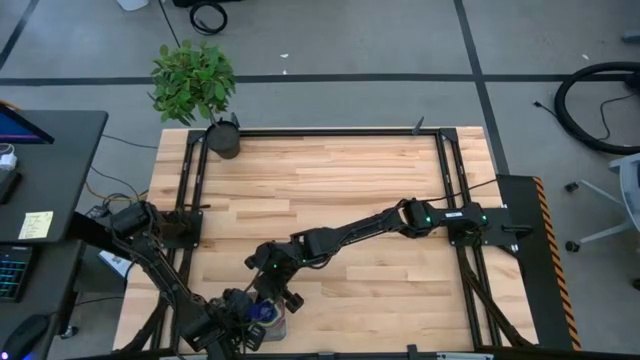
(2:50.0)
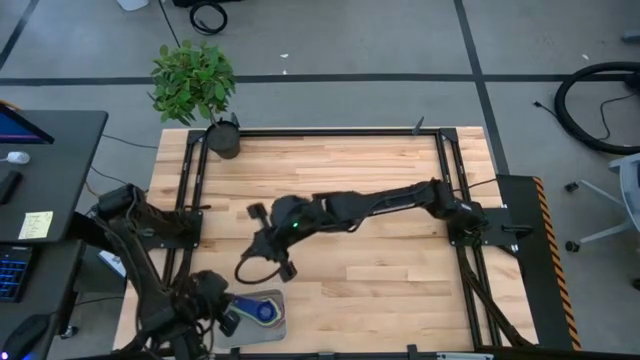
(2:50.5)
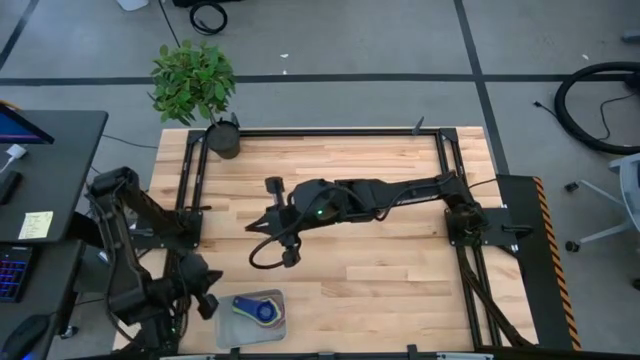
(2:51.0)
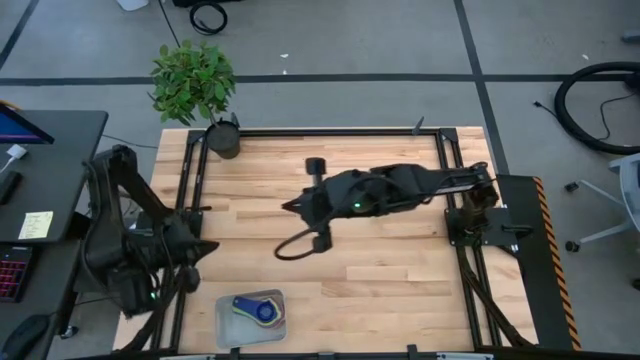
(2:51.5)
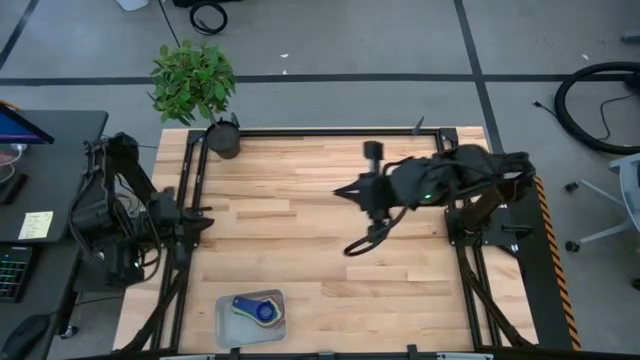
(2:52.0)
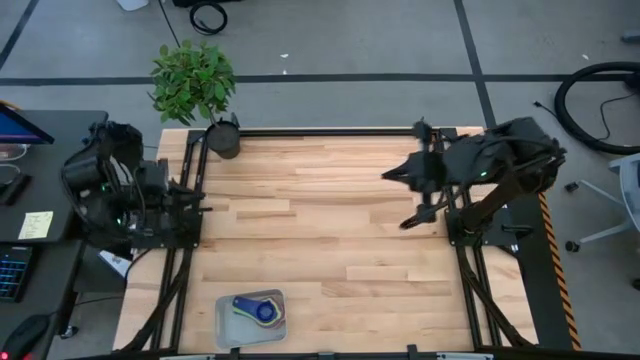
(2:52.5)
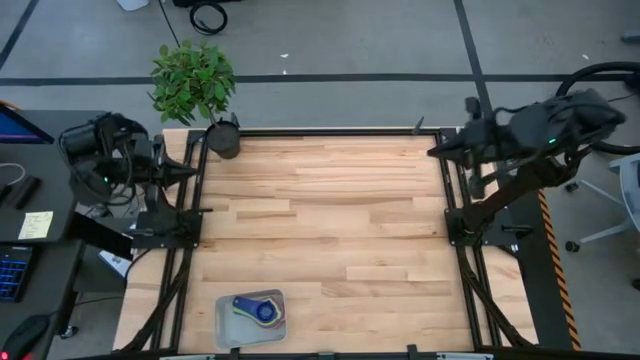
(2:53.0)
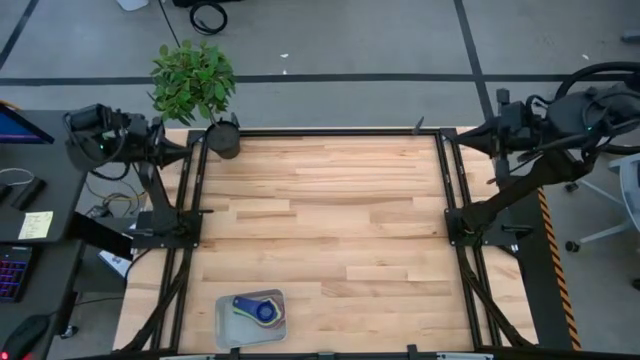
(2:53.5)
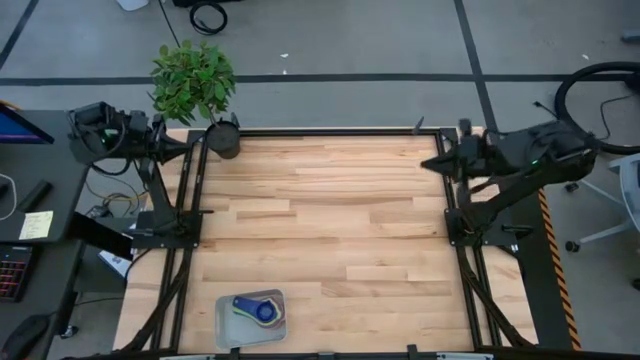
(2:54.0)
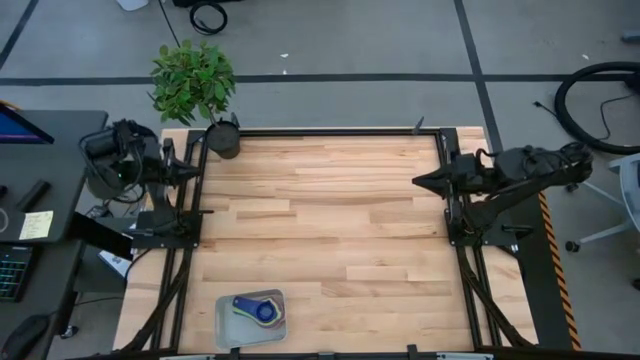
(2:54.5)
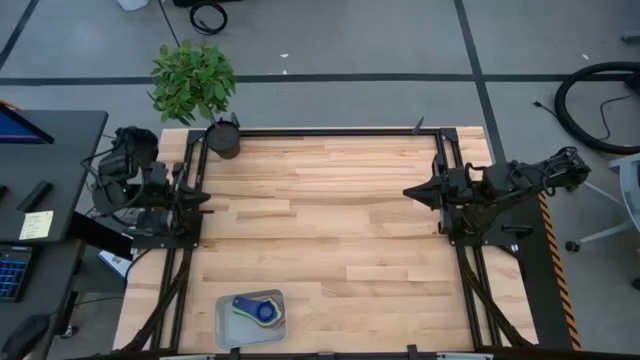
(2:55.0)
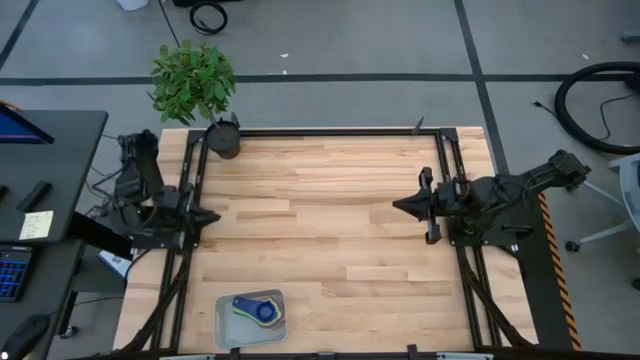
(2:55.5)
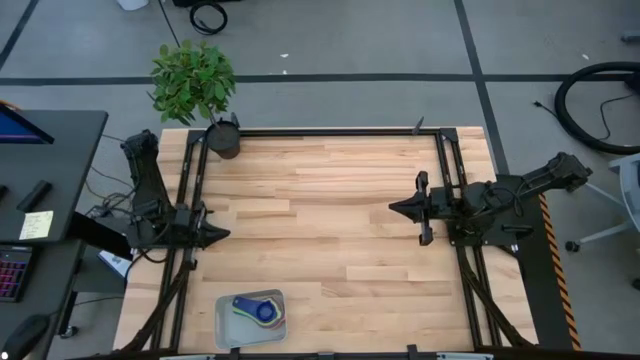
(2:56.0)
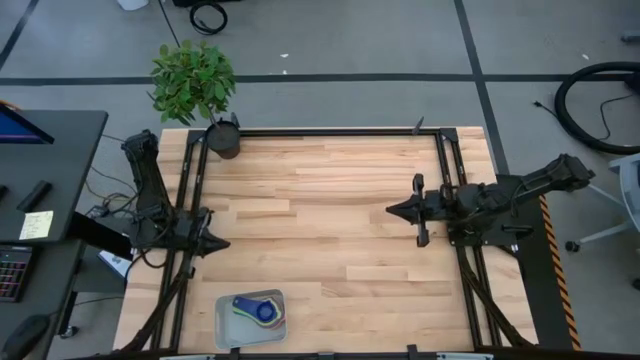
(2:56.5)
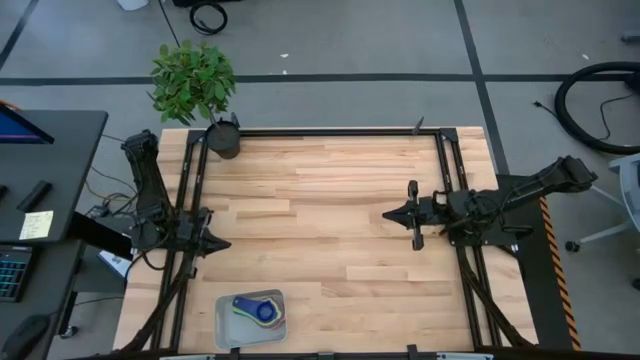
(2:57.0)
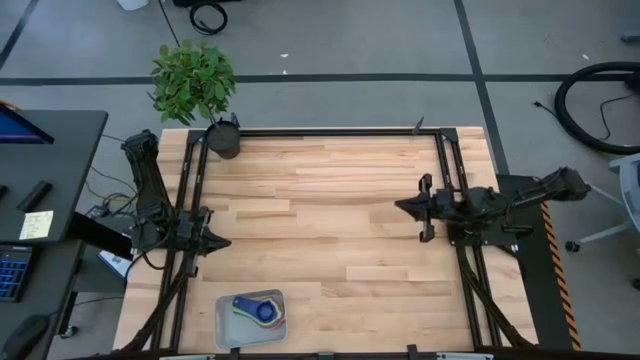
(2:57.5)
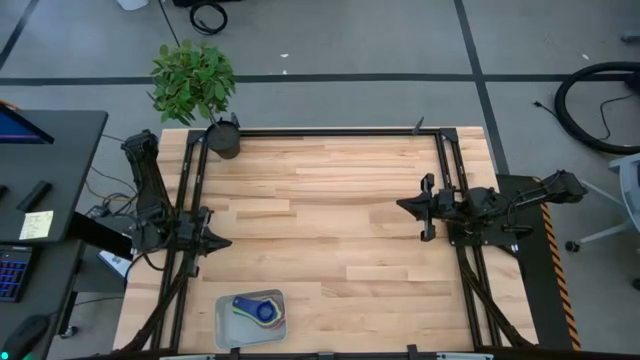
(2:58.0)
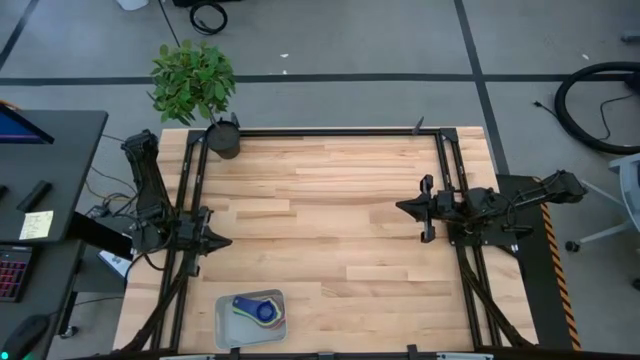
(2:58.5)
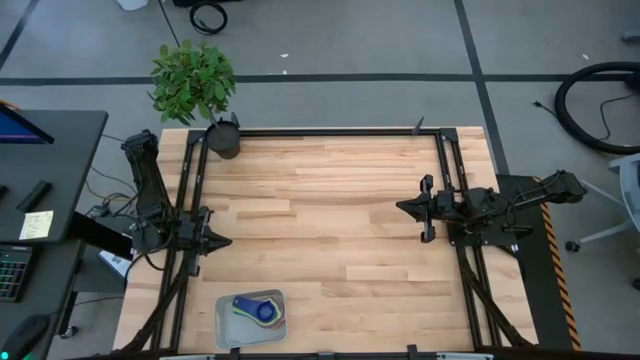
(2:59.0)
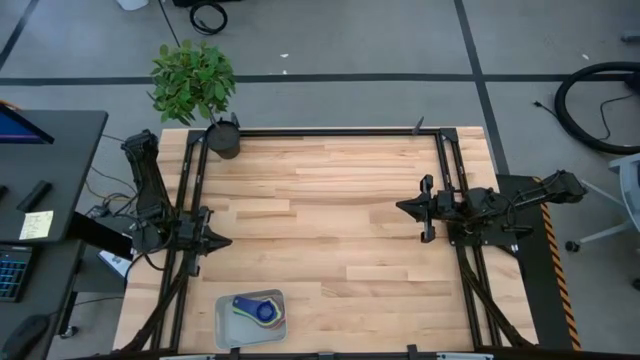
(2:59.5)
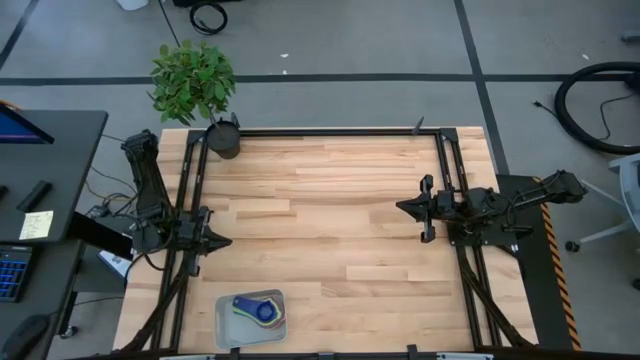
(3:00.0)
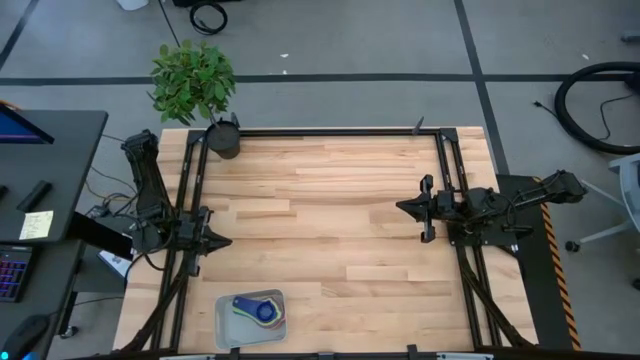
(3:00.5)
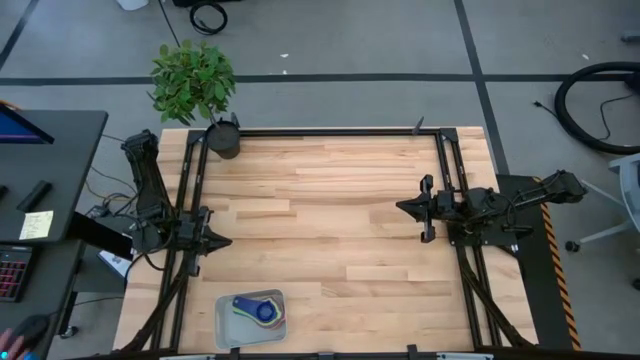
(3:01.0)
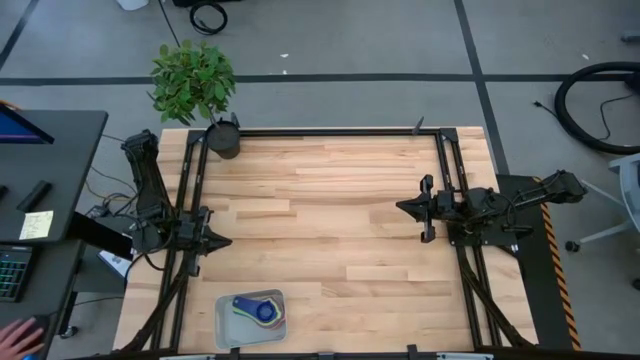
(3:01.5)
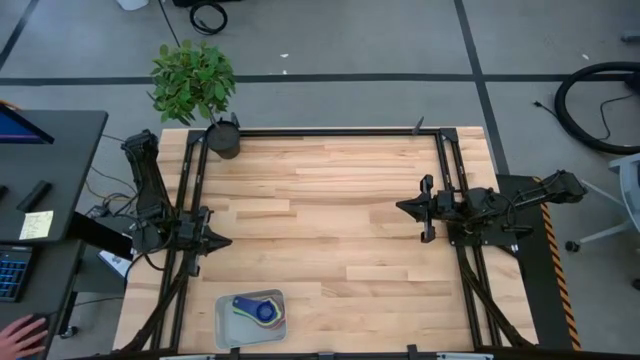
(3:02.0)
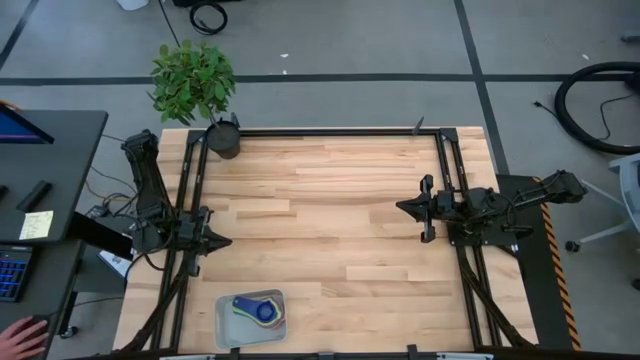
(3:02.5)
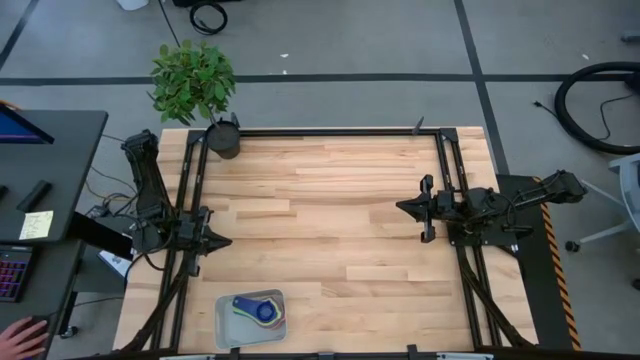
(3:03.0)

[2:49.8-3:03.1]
Task: Nest measuring cups in basket
Return to Home Position

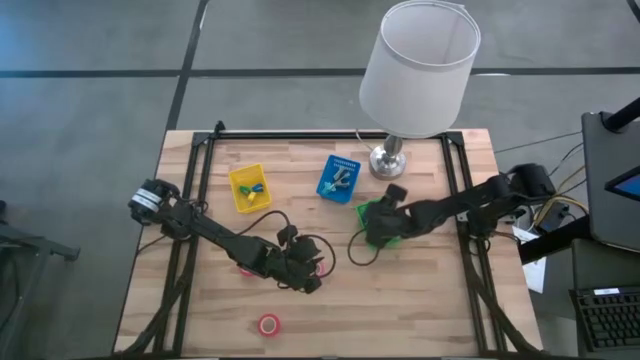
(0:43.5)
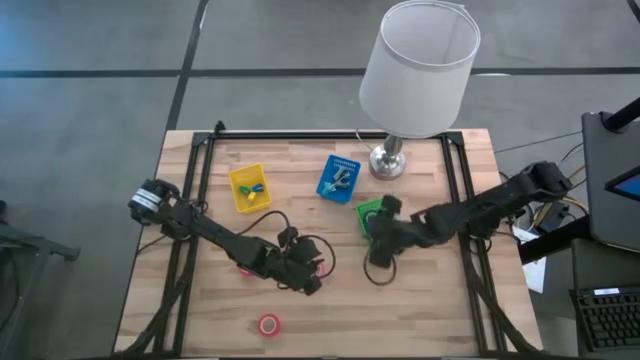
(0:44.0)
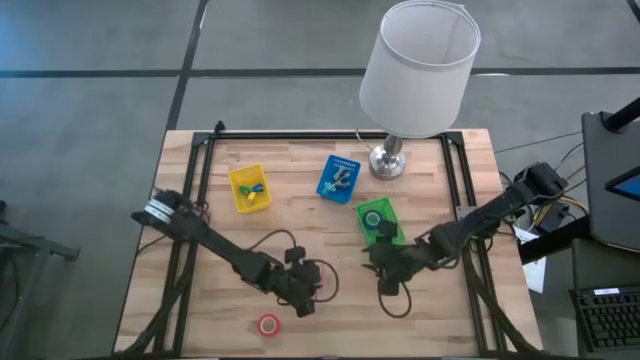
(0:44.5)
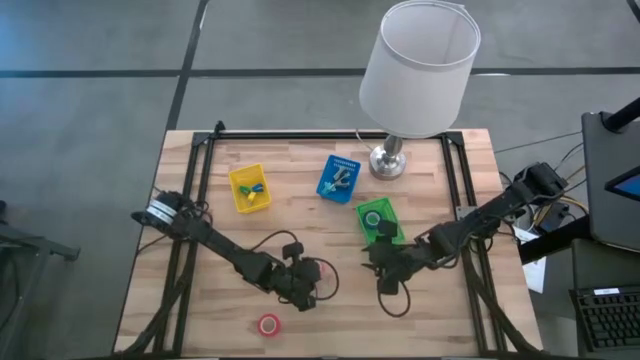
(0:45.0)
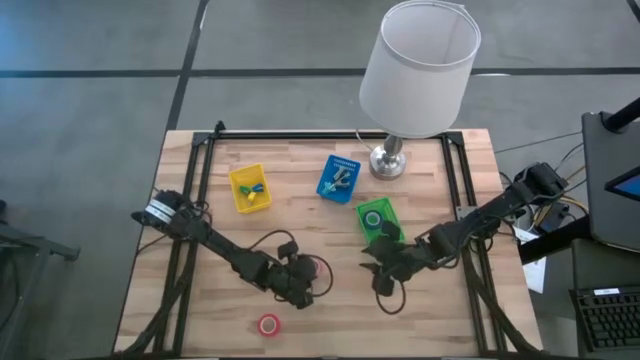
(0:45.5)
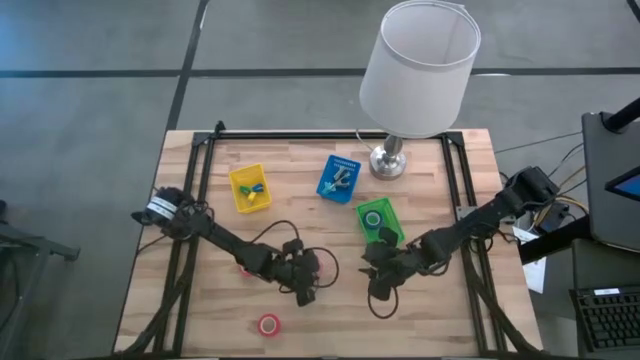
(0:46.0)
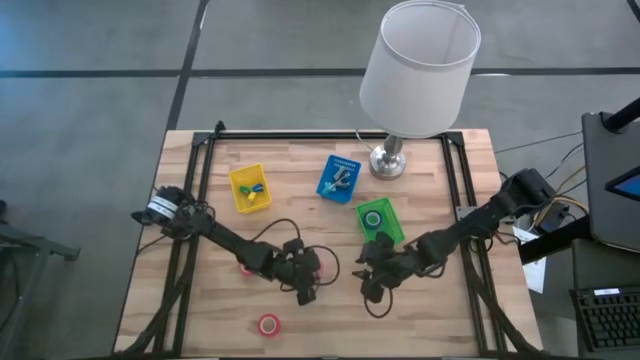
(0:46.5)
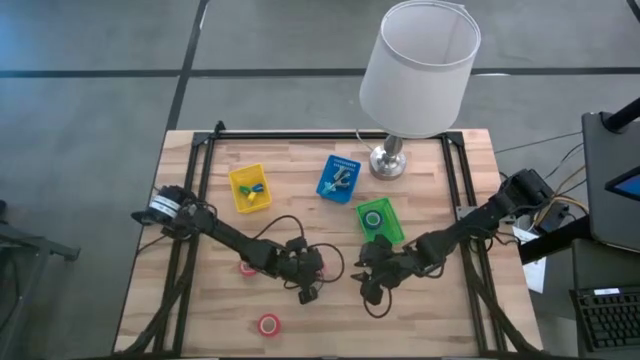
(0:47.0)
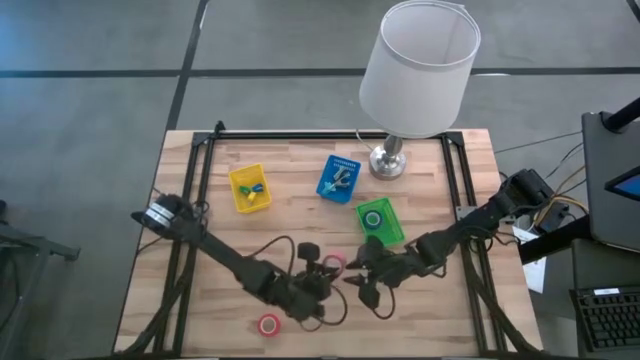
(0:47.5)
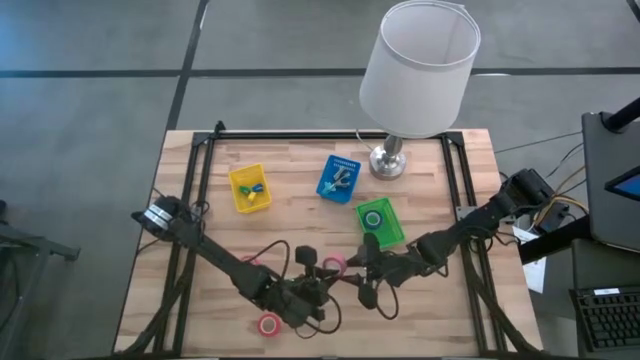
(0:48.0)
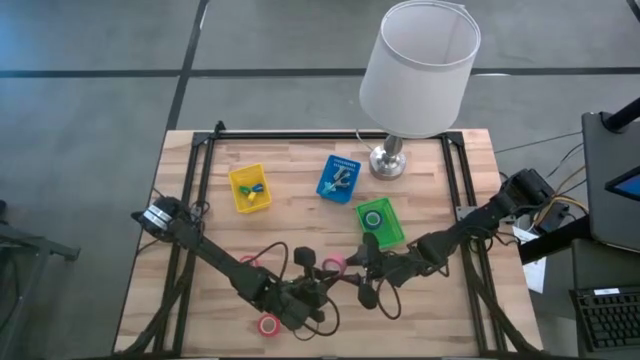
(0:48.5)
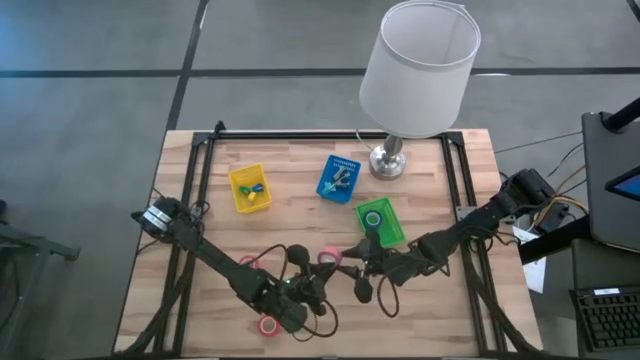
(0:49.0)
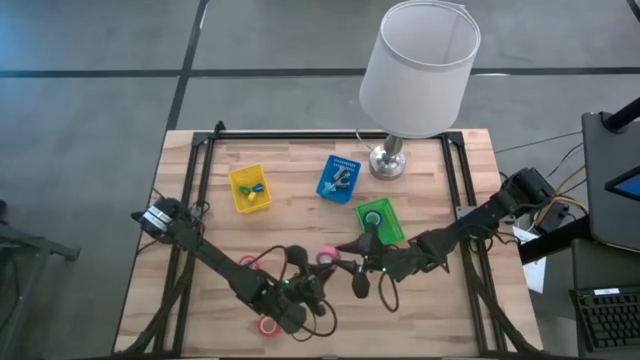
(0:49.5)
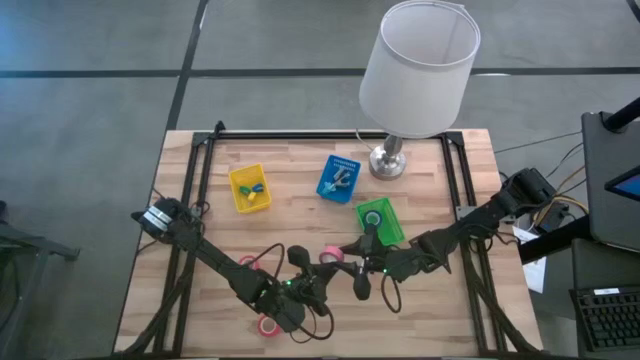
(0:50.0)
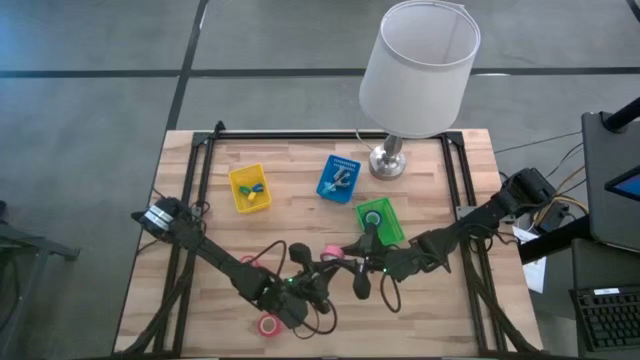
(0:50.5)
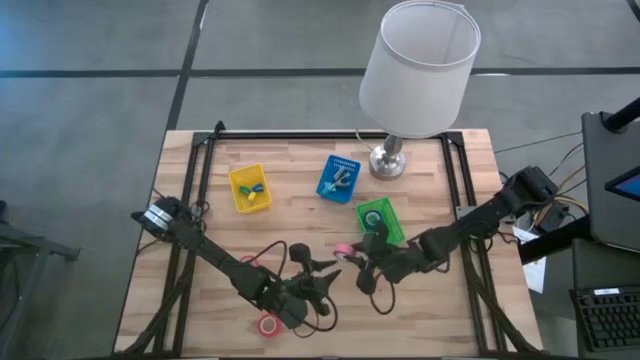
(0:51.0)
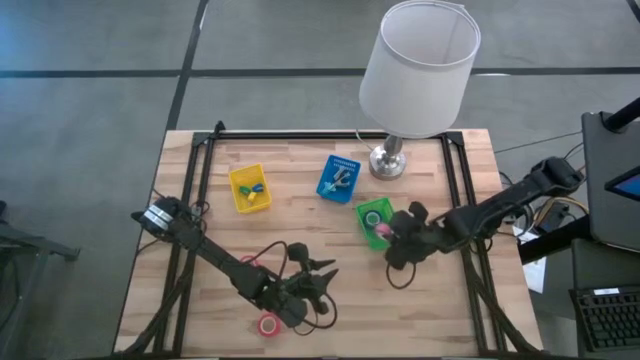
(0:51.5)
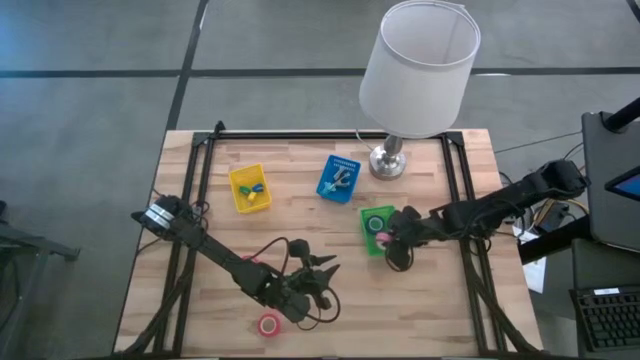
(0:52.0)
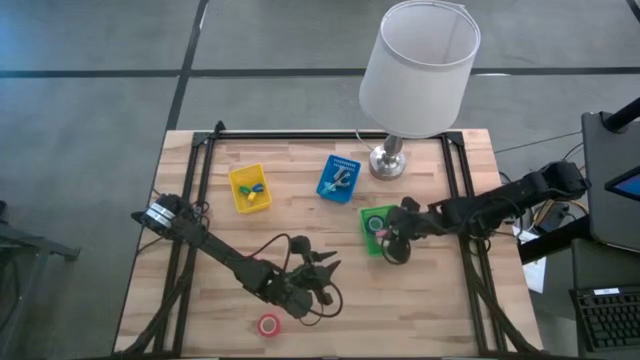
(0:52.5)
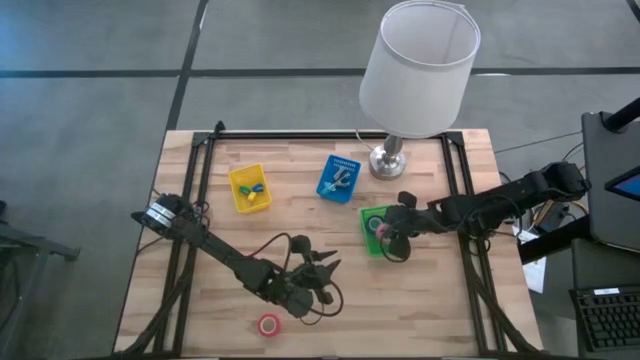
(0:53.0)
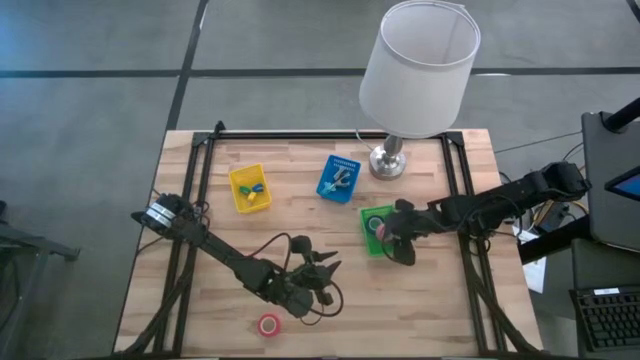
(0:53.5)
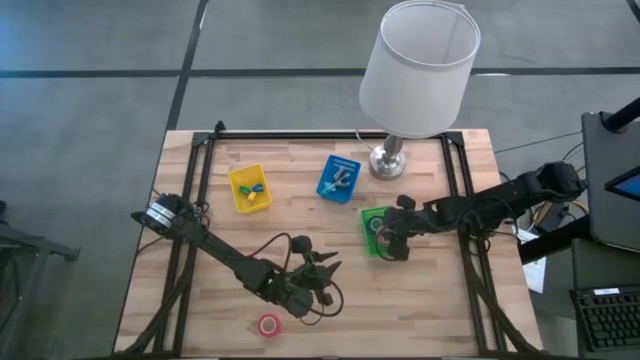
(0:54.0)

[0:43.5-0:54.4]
Task: Pick and place Stapler, Stapler remover, tape
Put the pink tape into the green basket
